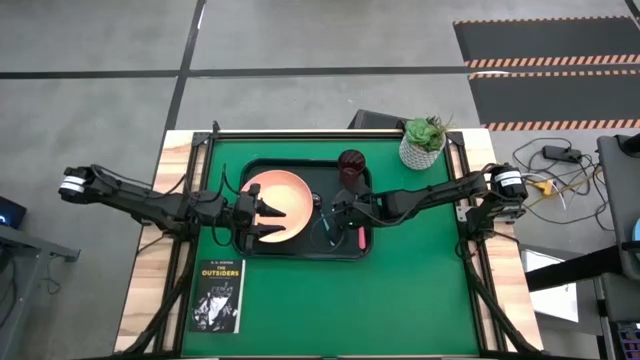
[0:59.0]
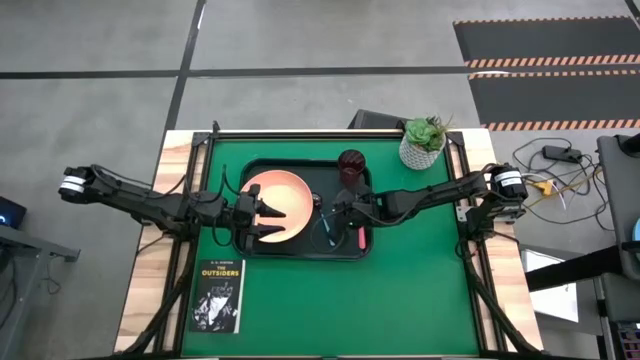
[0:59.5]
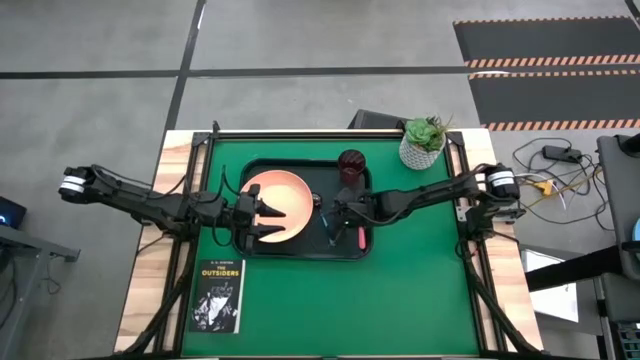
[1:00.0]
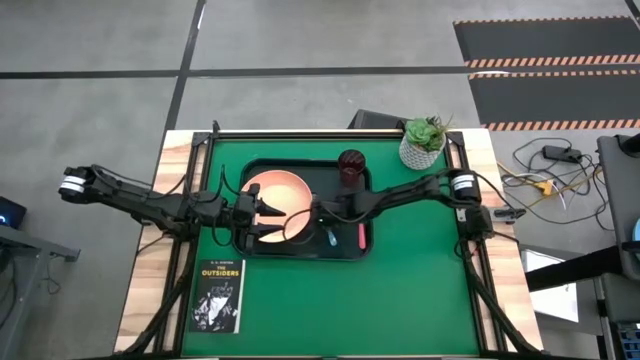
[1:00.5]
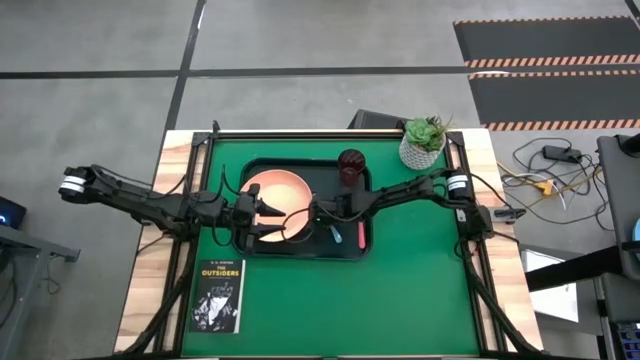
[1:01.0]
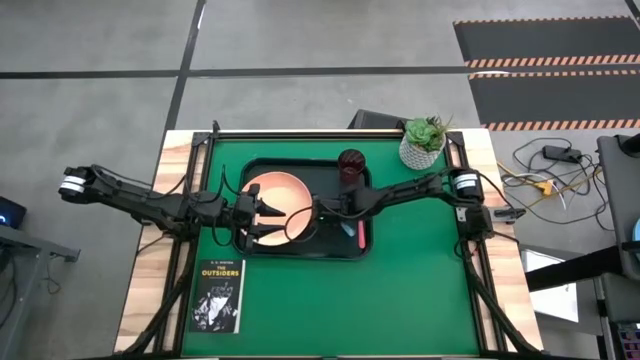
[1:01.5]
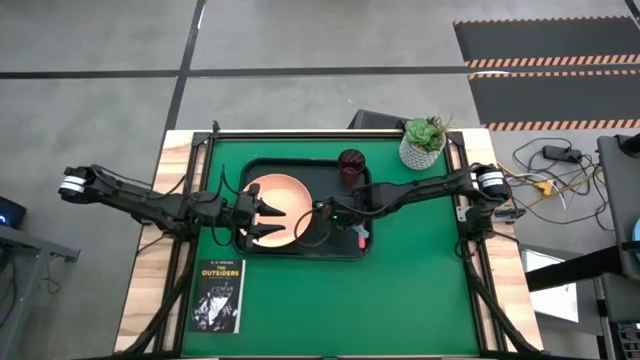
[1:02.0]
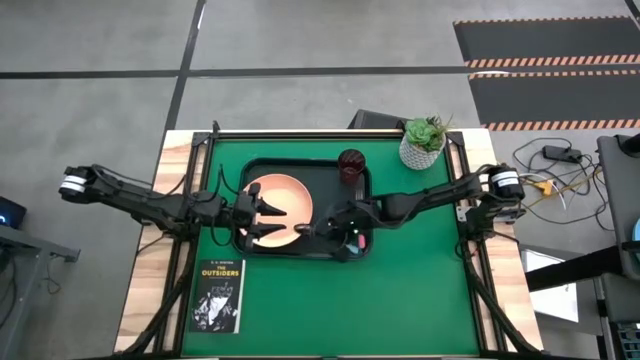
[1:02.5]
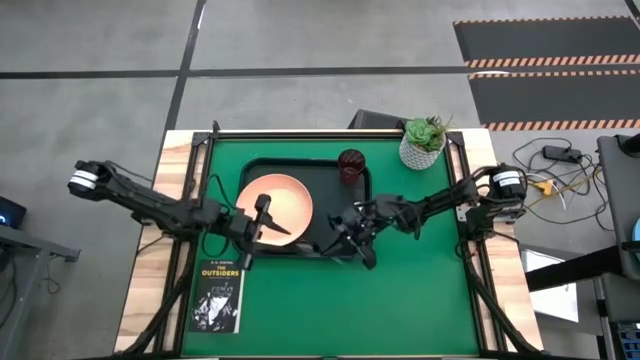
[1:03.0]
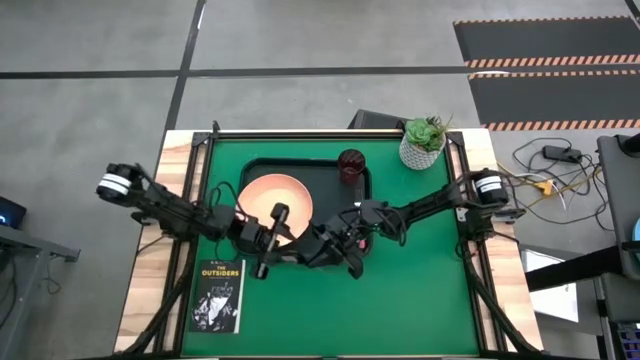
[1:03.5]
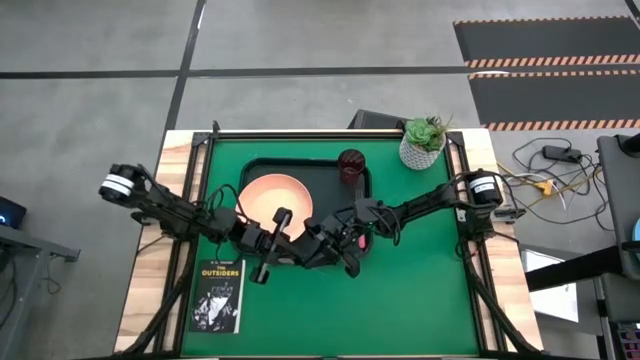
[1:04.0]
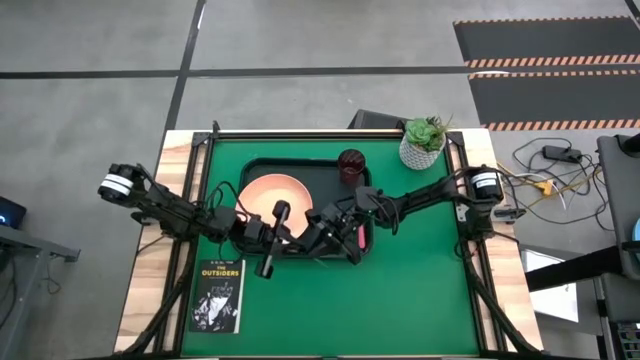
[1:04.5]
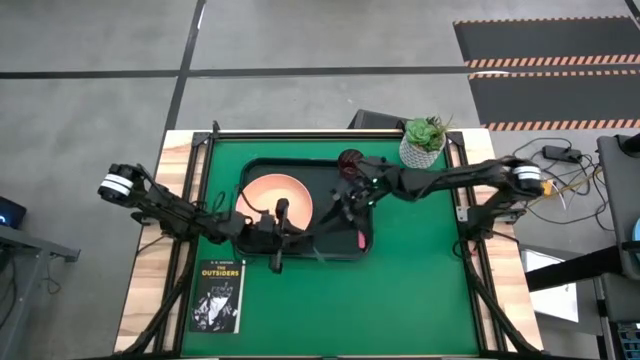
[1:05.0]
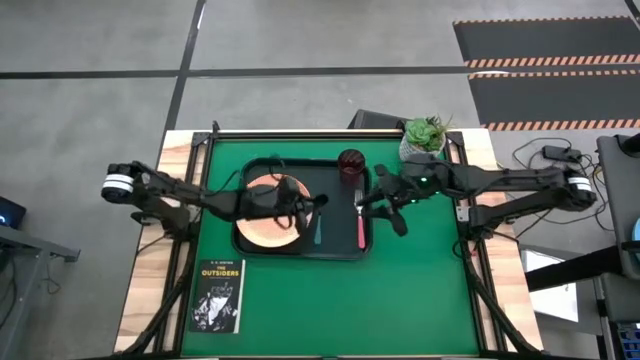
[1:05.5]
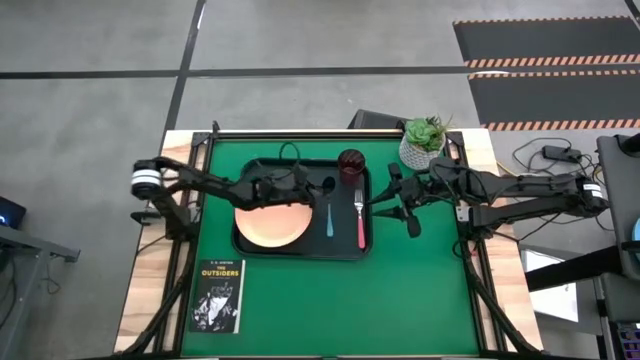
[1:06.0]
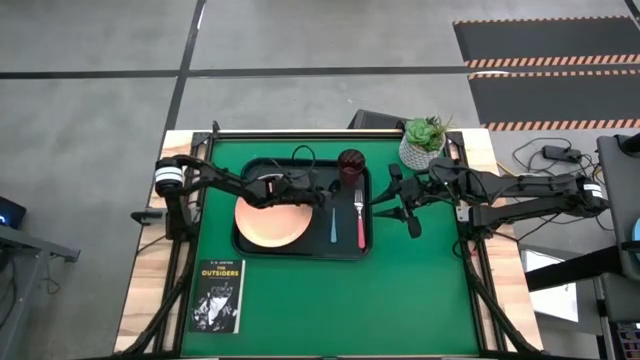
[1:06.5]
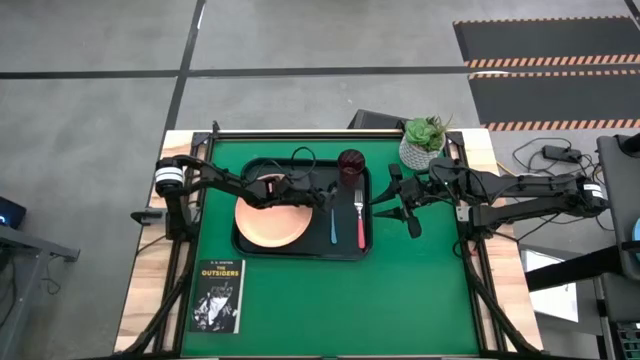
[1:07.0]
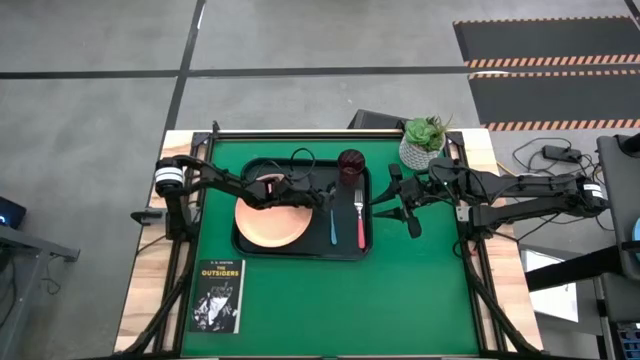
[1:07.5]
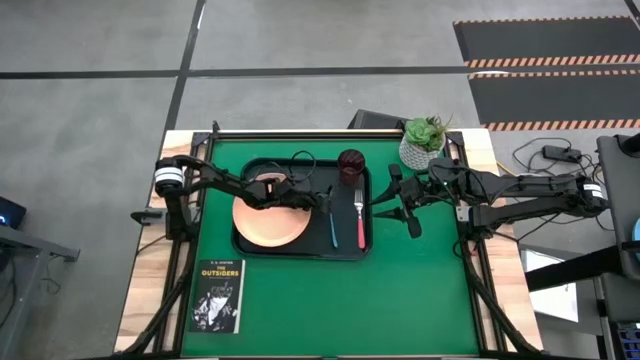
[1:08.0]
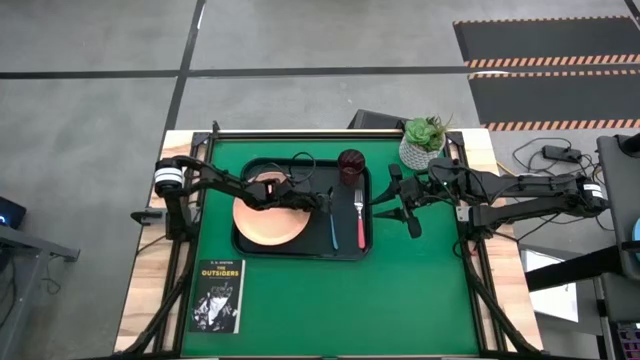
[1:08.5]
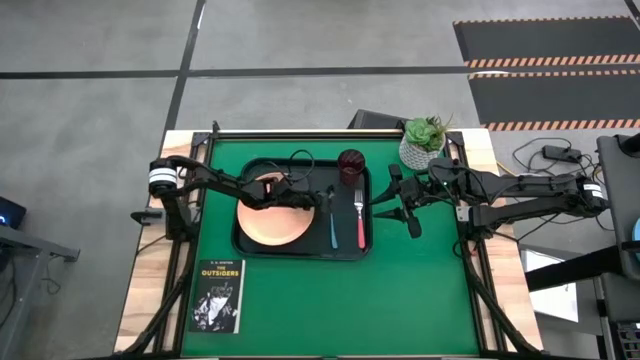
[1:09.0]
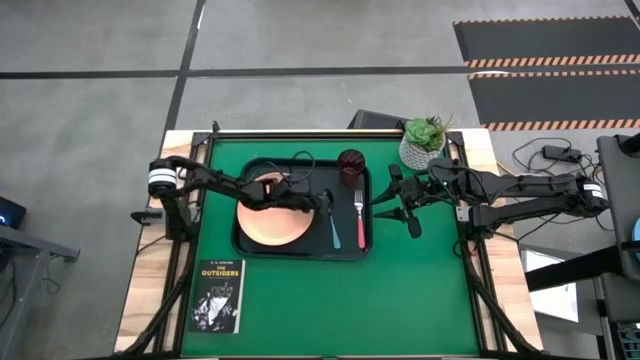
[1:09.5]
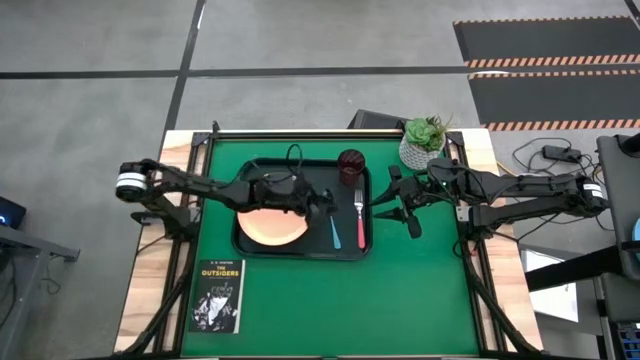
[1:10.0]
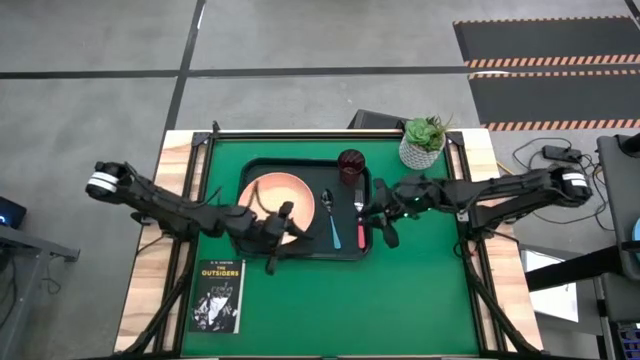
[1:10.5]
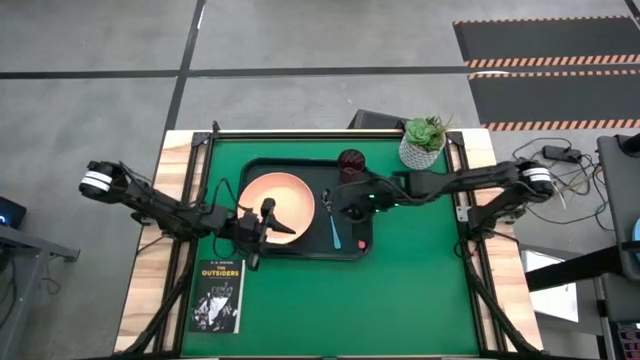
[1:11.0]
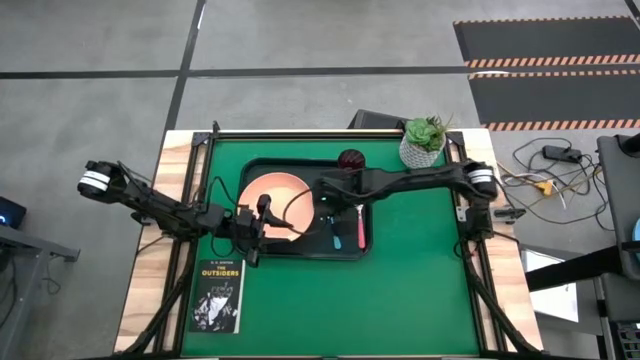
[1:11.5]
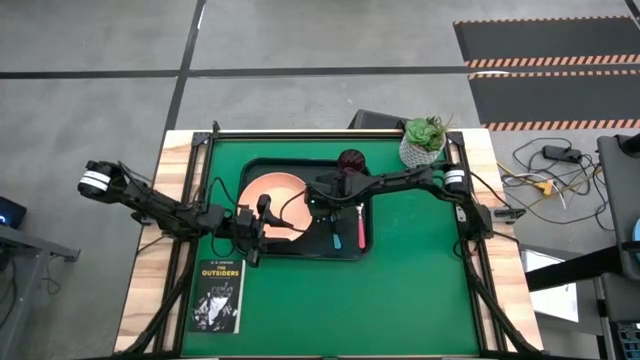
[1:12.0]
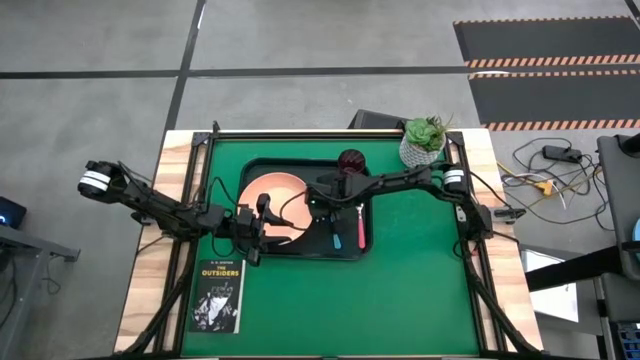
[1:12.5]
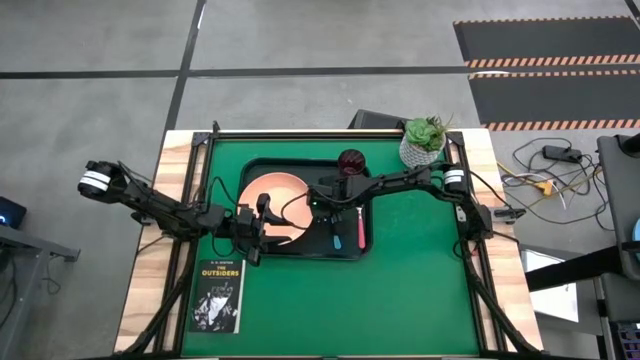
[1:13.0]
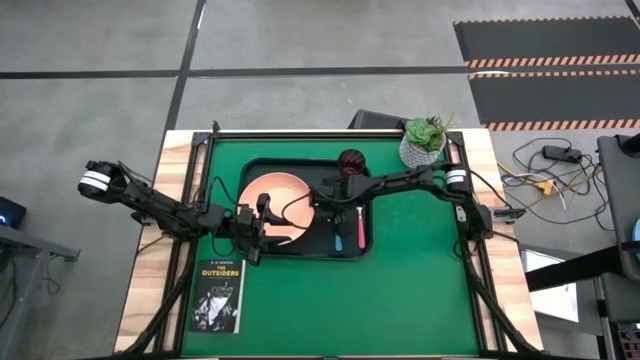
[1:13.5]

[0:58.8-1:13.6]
Task: Pick and place plate/cup/fork/spoon on tray
Adjust the blue spoon on the black tray

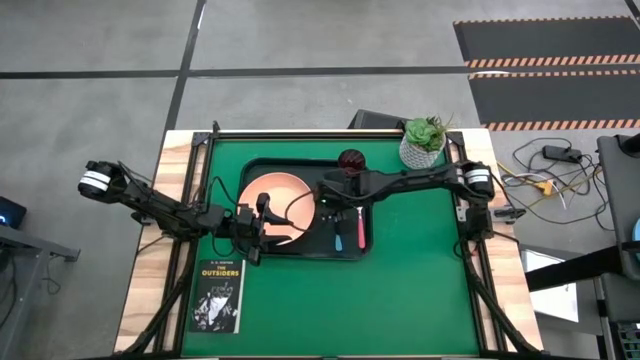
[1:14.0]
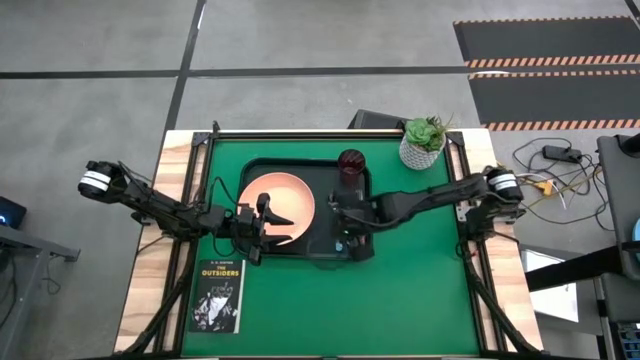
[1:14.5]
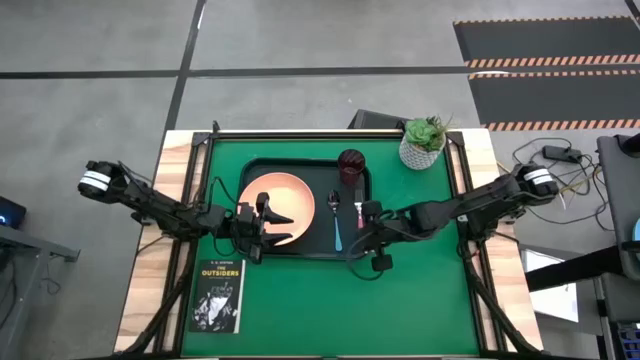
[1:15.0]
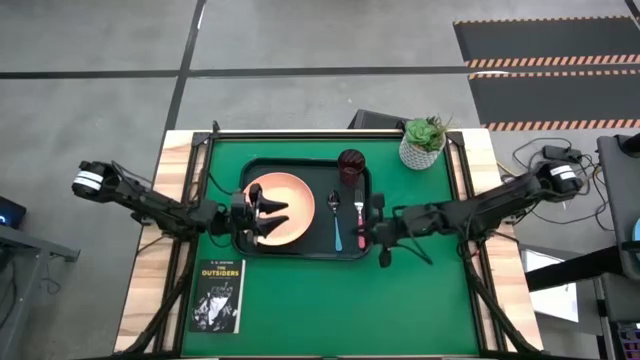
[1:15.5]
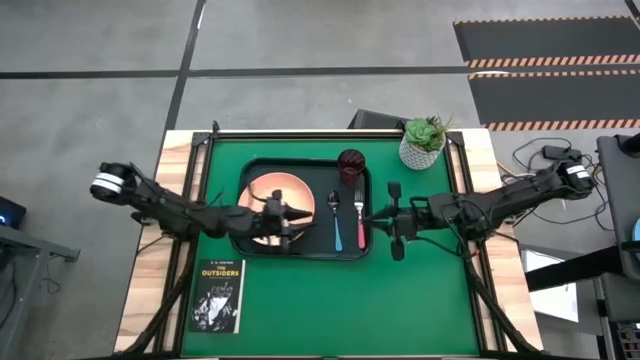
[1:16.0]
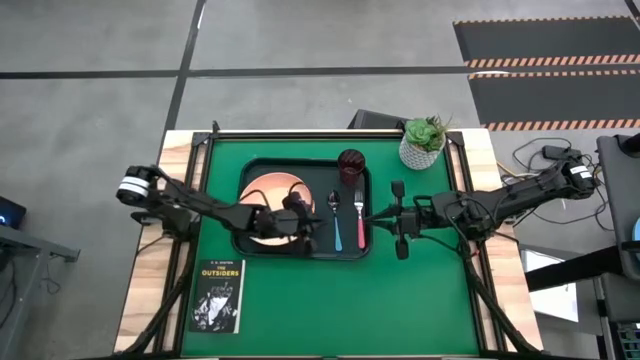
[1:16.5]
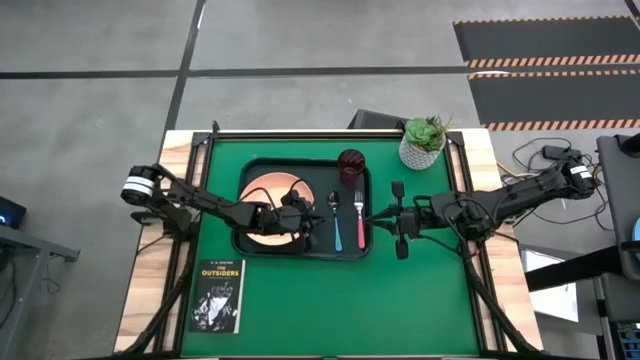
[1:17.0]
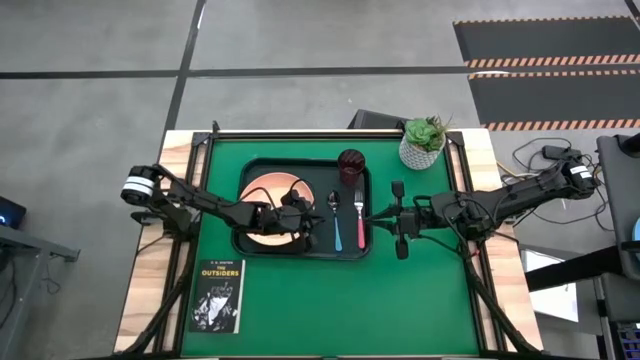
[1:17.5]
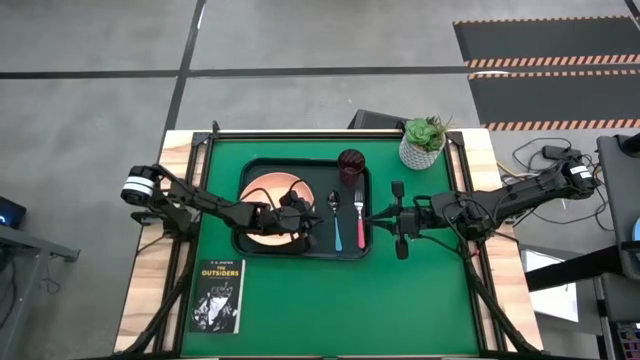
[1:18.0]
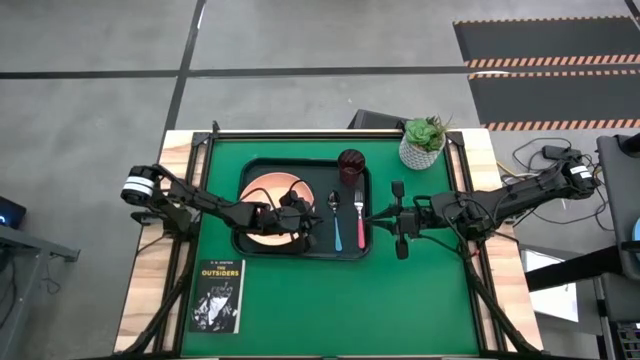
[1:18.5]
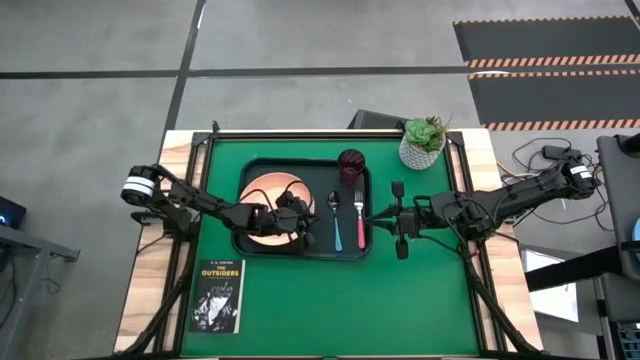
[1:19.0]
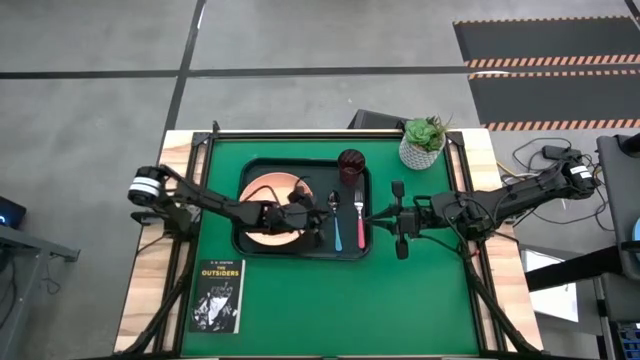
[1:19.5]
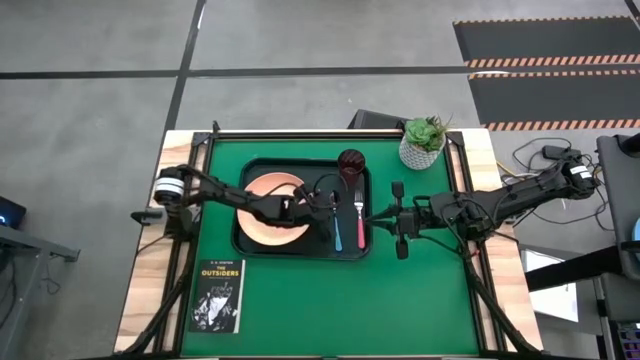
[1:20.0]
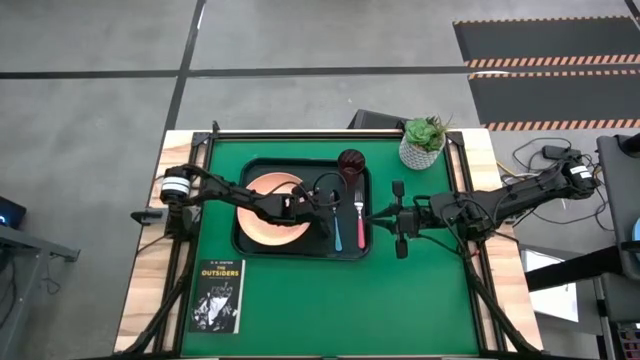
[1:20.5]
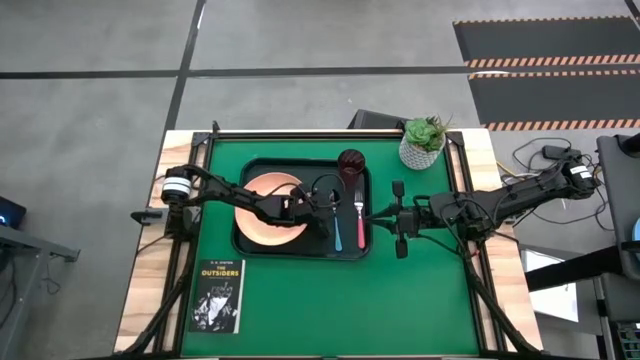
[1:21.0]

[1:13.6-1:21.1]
Adjust the orange plate on the black tray
